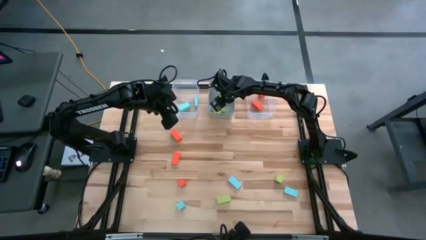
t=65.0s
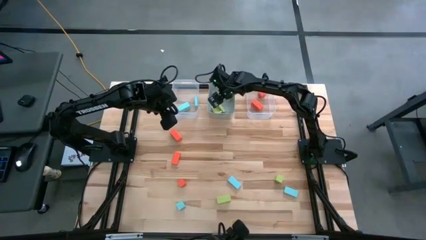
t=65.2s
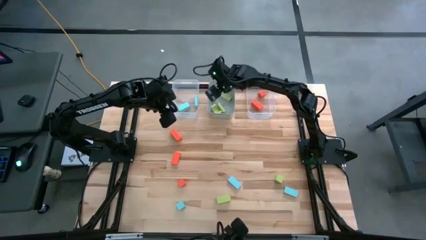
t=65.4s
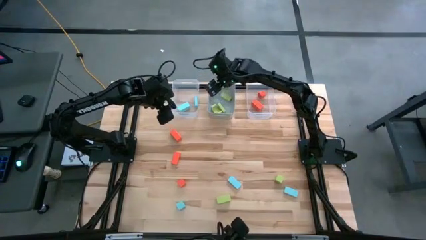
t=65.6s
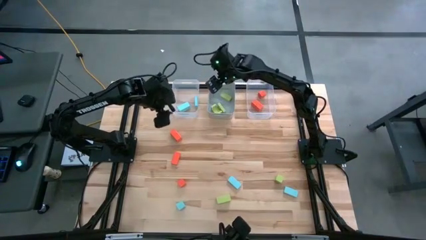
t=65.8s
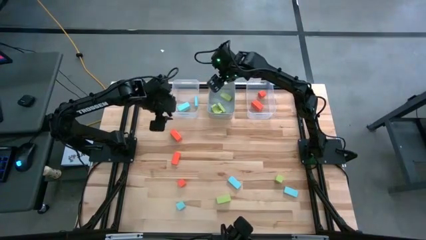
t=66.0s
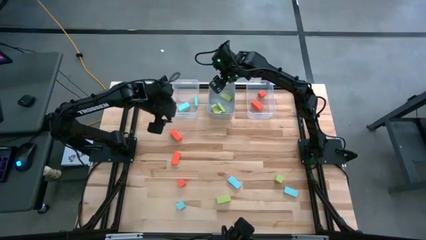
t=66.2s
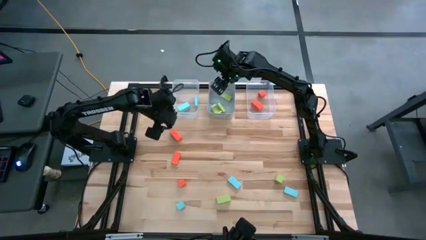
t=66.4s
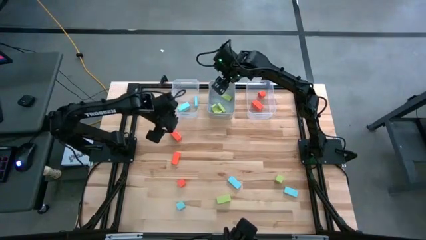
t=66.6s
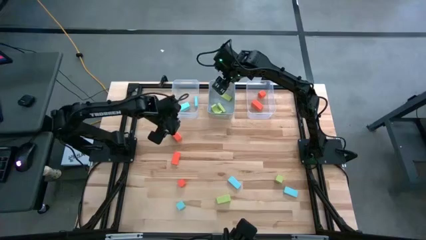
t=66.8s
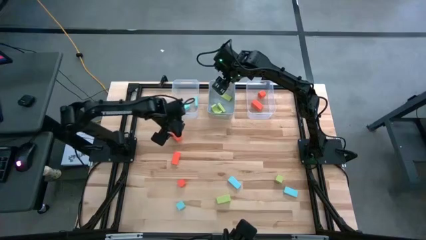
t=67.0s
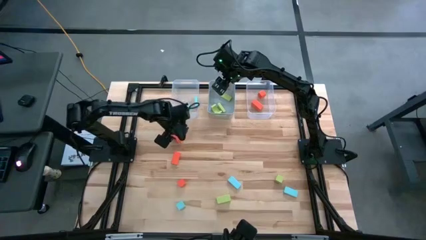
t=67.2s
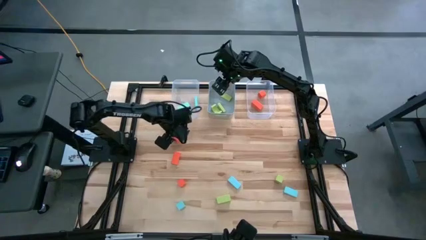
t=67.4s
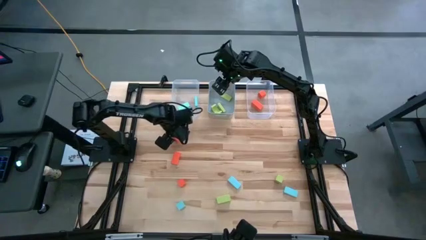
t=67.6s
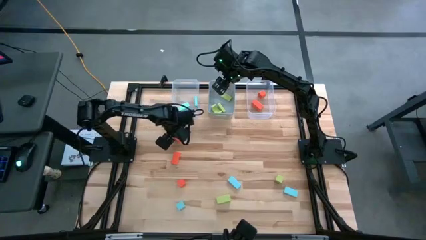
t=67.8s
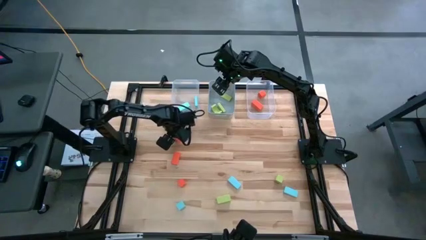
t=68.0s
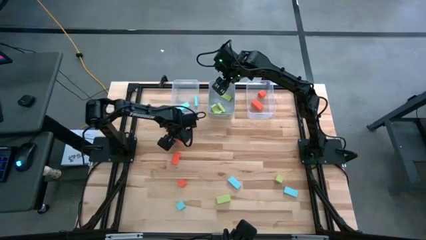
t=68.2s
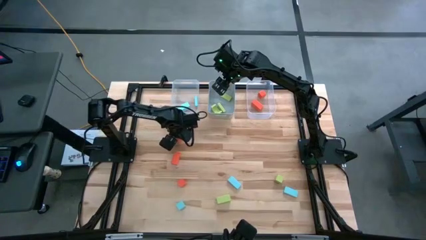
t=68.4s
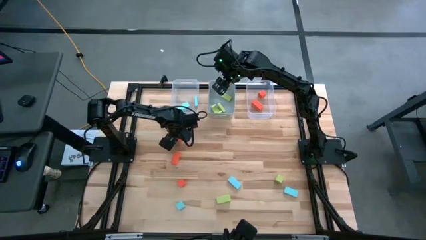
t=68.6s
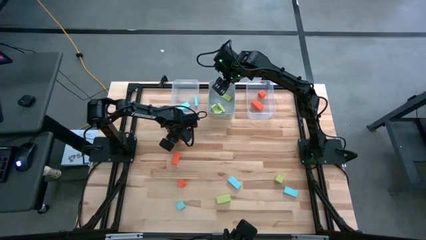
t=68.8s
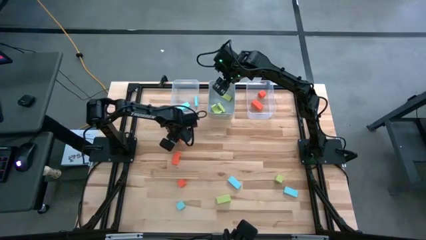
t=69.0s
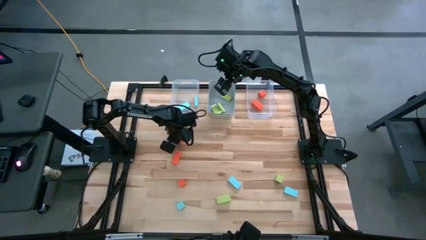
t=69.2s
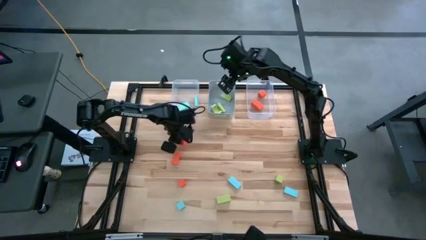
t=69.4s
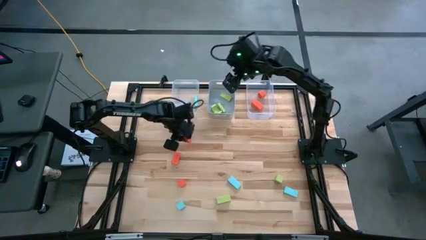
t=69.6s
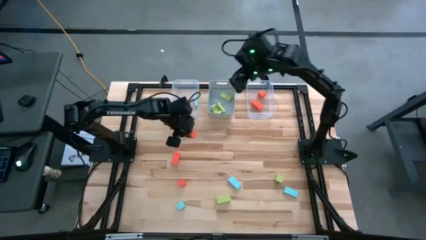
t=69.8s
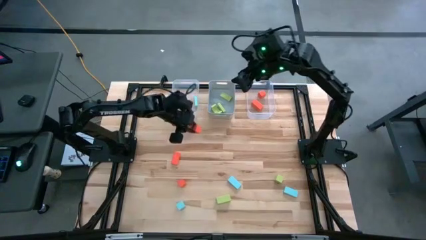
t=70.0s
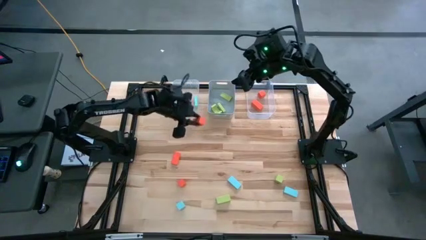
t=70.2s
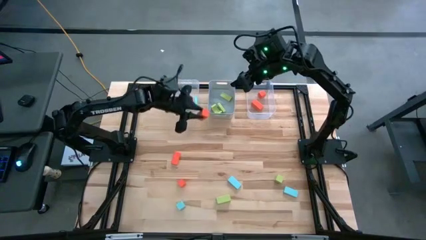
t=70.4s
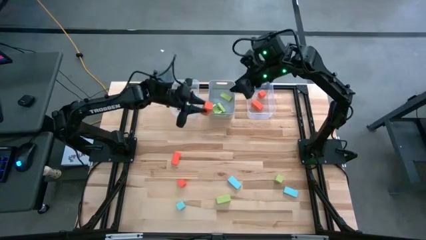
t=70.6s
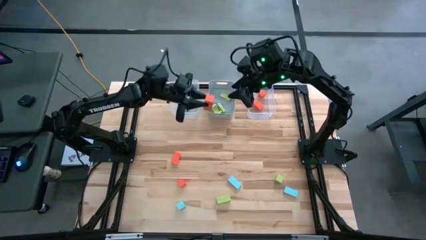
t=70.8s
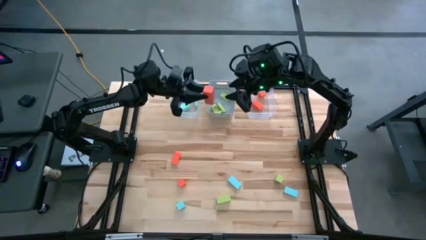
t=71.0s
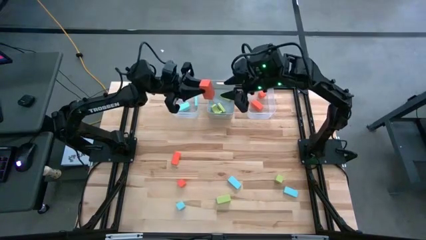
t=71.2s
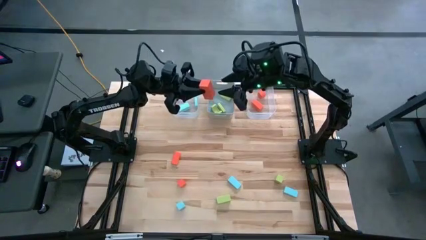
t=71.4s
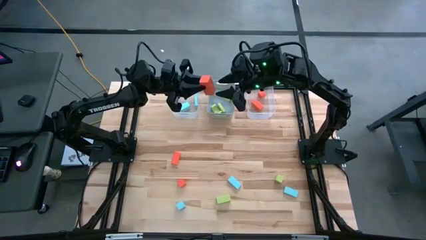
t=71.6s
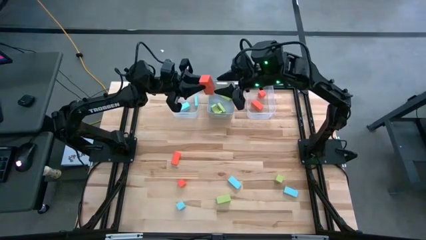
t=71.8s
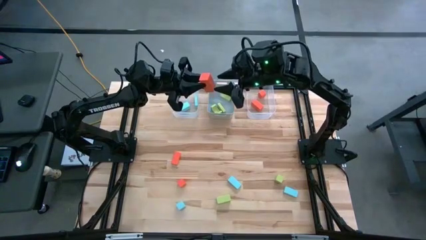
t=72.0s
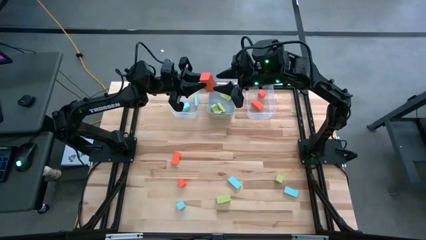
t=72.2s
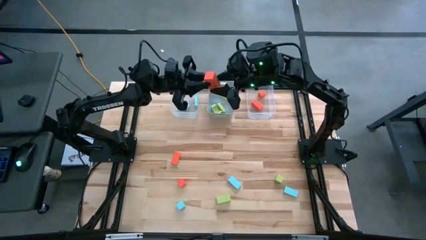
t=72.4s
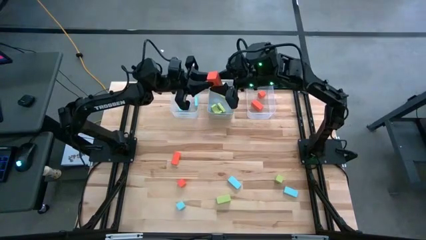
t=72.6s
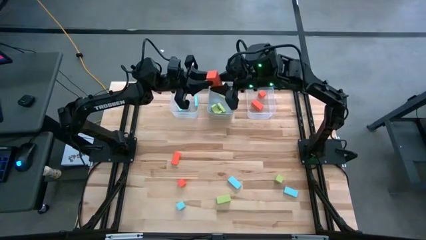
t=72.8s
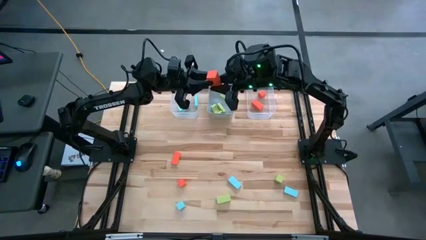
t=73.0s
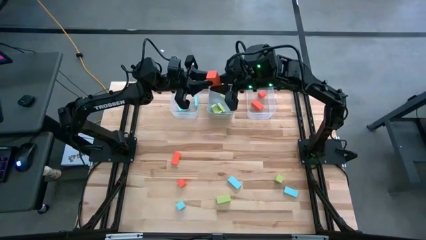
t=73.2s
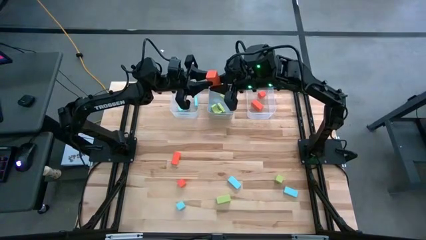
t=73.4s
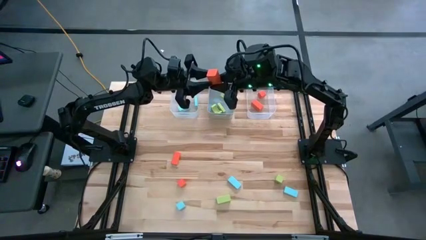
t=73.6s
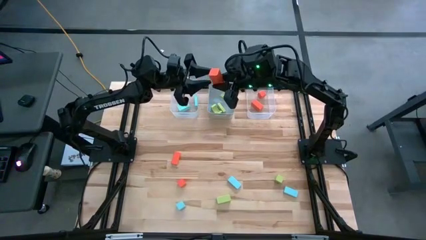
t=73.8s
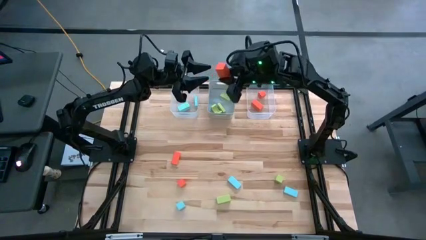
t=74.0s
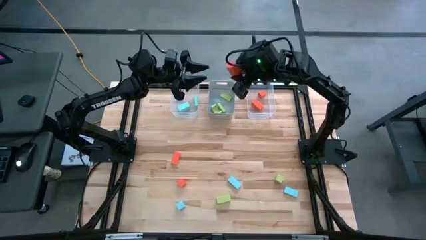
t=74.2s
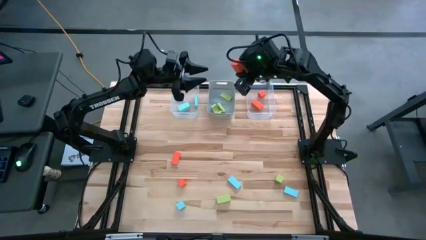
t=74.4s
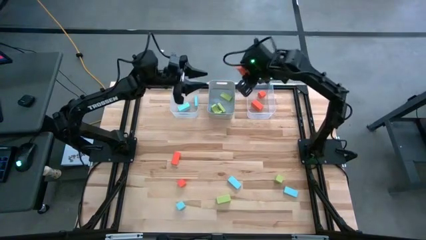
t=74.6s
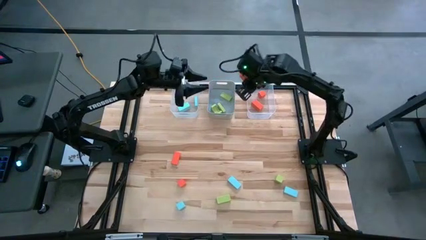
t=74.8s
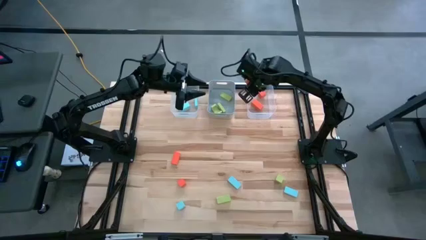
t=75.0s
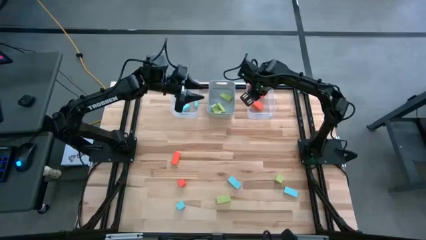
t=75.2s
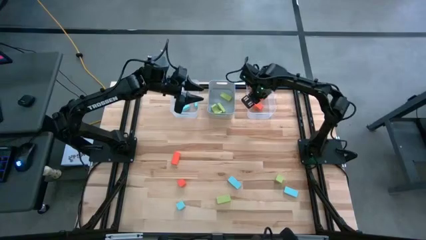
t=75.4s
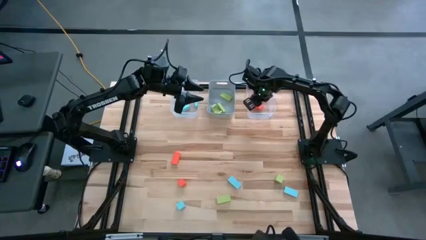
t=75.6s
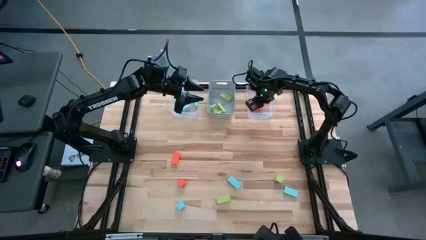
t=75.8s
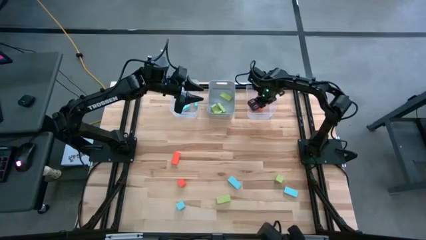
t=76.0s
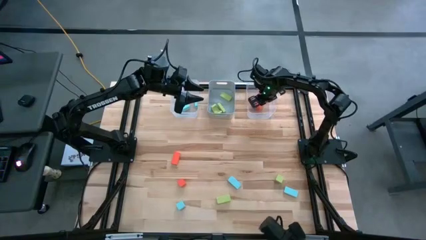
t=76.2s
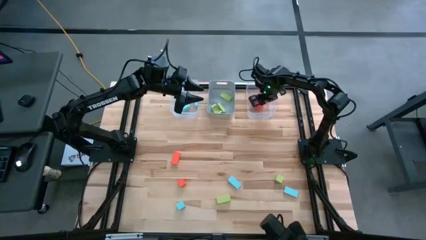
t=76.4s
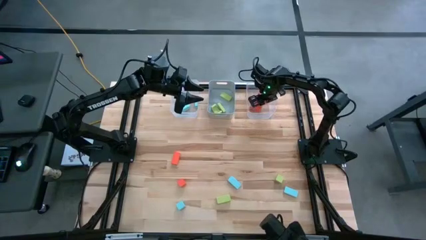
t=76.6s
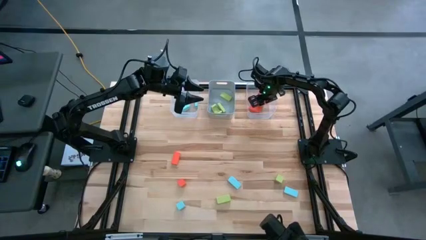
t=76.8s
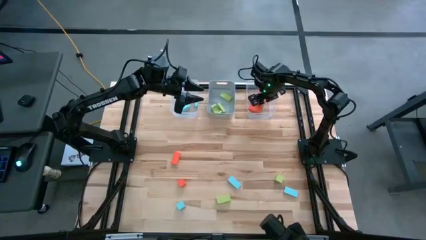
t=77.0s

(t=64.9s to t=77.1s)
Task: Sort & place blocks by color
Put the orange block into the right transparent bin

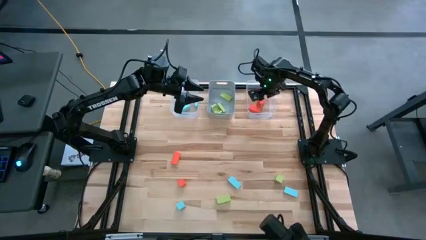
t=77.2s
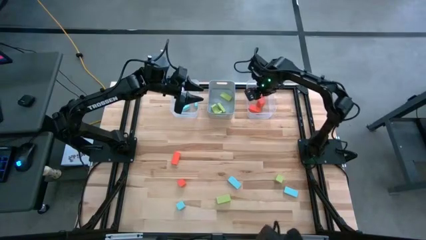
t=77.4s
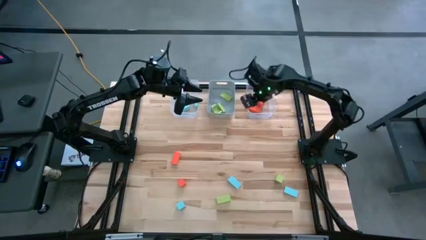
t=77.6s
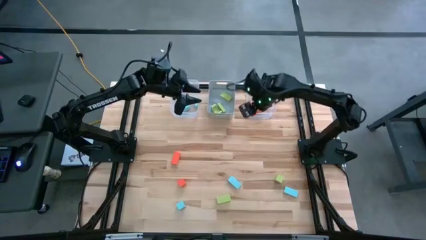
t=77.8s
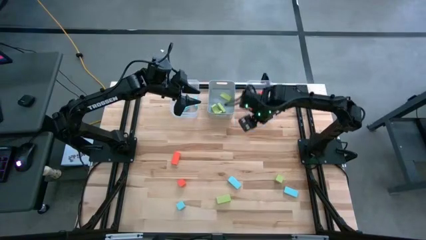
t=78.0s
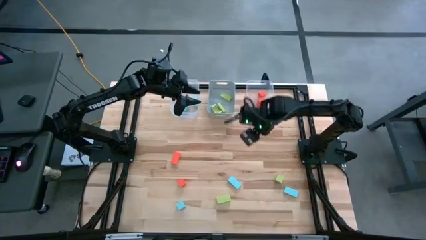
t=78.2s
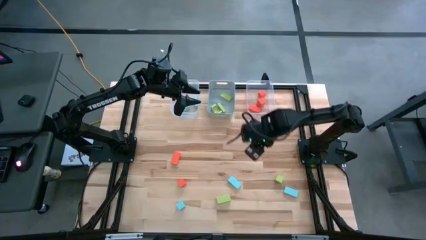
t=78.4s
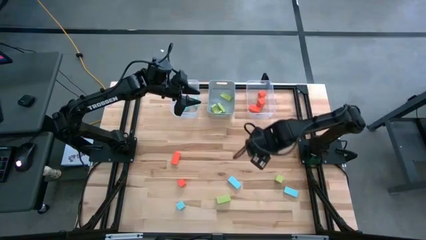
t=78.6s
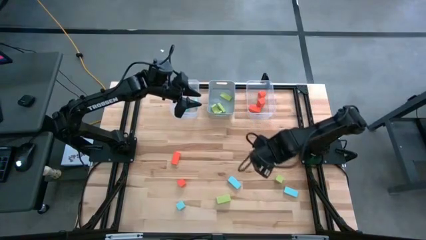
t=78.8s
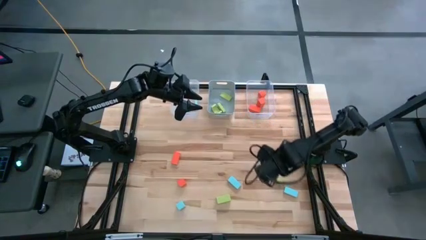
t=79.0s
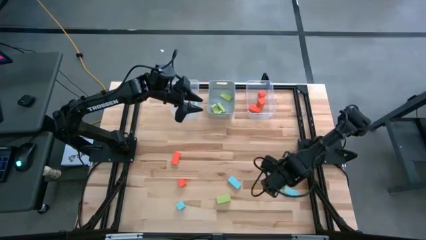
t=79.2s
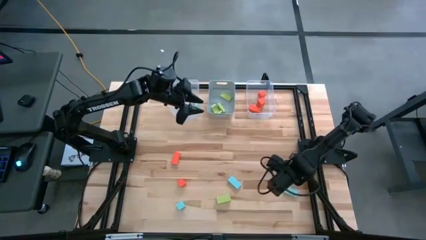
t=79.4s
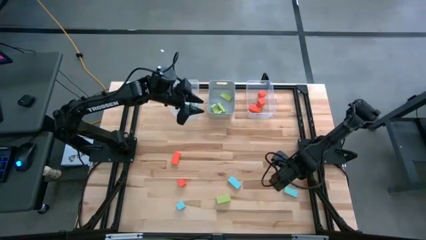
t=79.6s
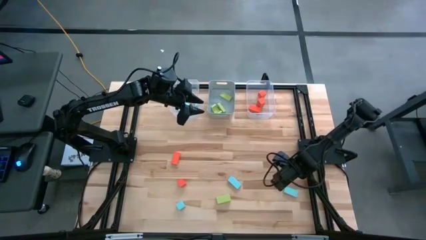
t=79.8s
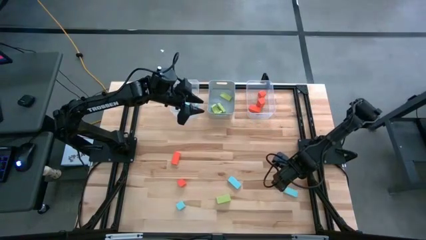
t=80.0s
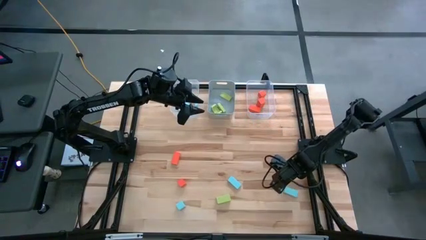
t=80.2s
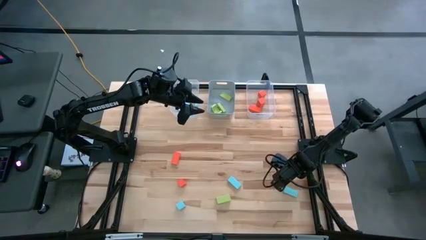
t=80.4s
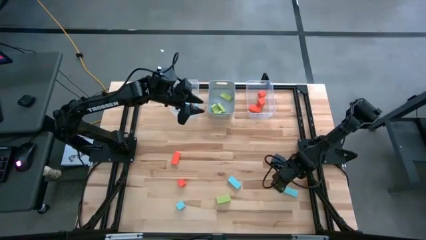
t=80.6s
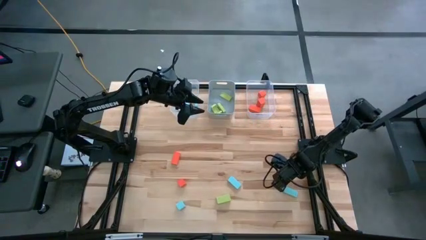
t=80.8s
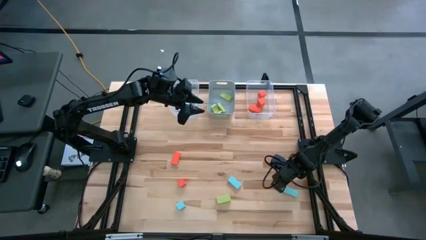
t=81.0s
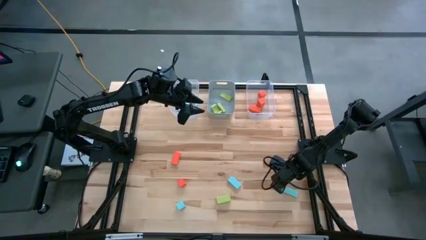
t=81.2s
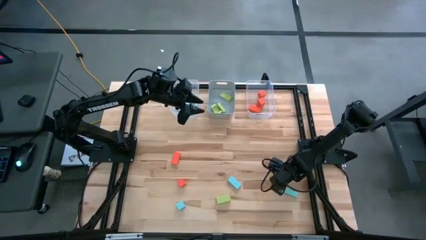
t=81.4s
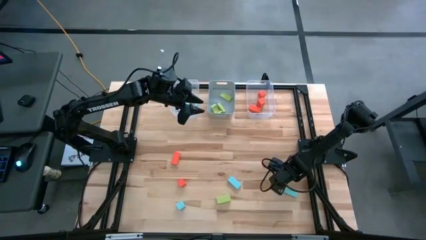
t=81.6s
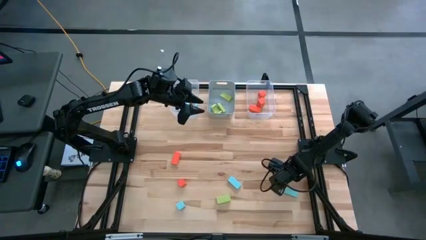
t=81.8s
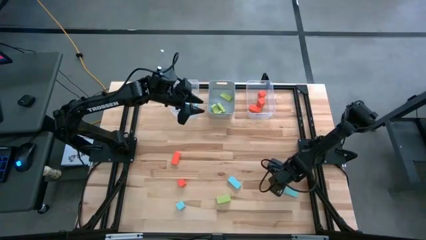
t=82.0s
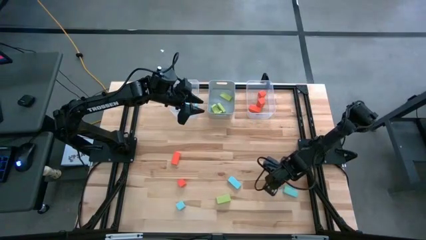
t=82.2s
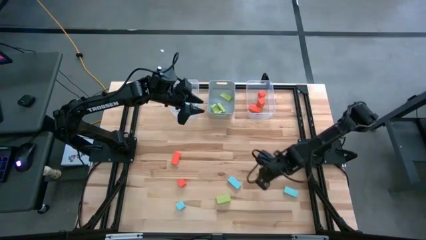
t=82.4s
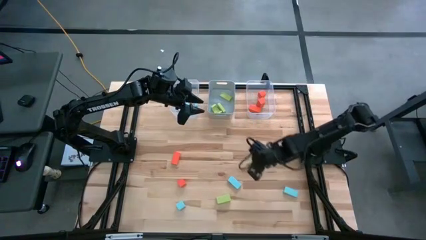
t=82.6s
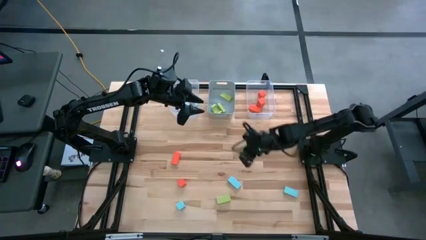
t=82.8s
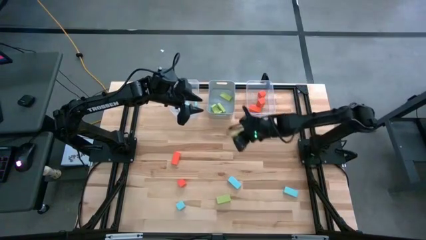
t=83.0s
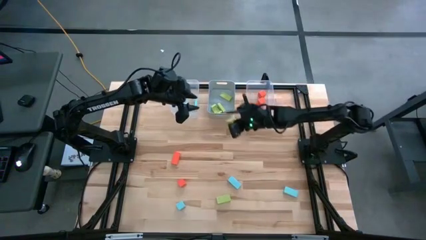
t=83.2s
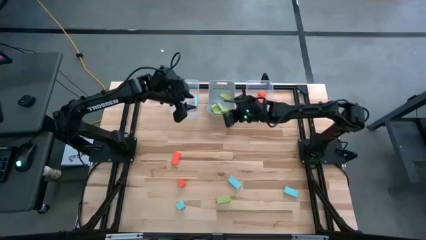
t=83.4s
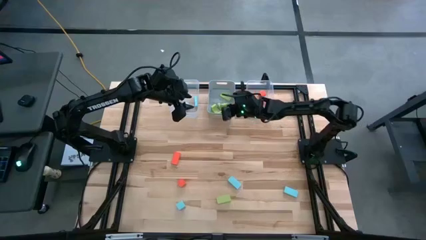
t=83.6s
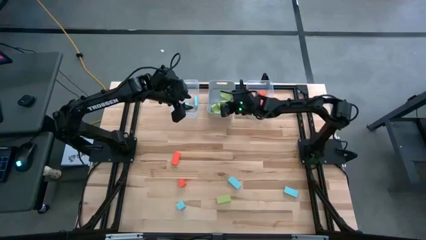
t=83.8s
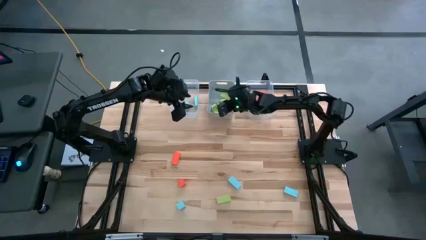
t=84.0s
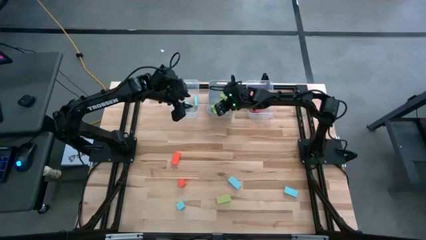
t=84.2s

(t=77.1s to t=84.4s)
Put the green block into the blue bin
